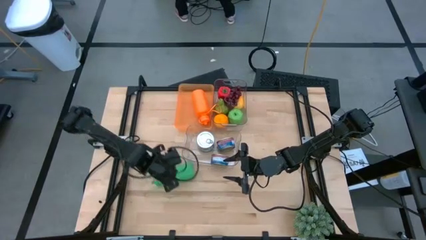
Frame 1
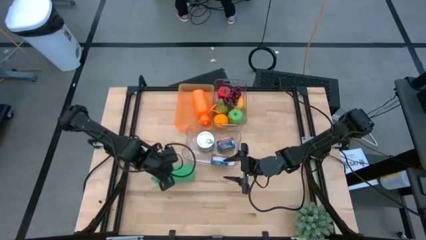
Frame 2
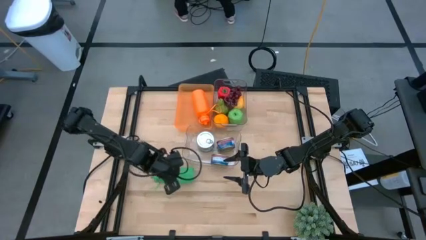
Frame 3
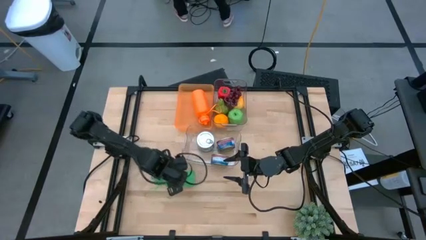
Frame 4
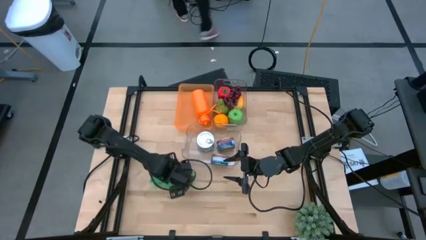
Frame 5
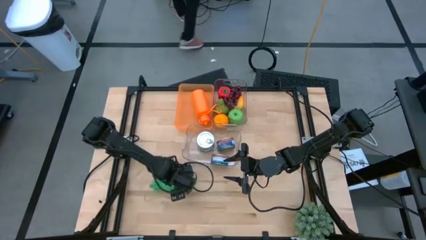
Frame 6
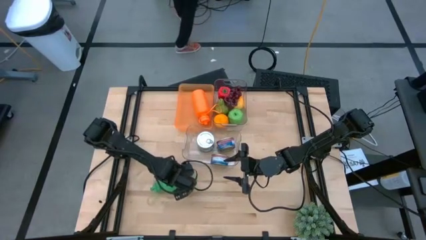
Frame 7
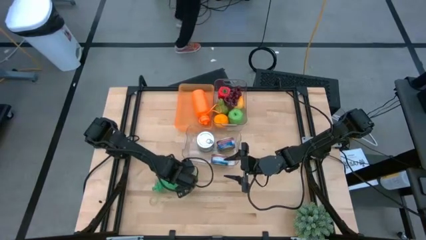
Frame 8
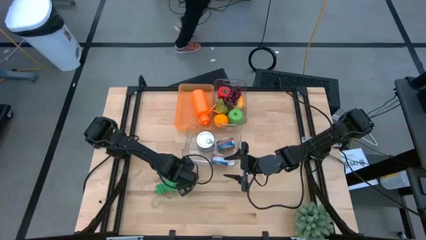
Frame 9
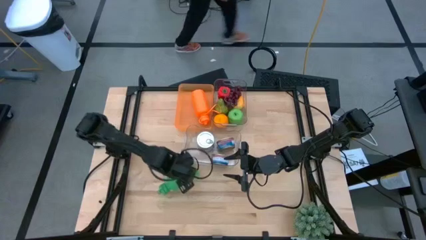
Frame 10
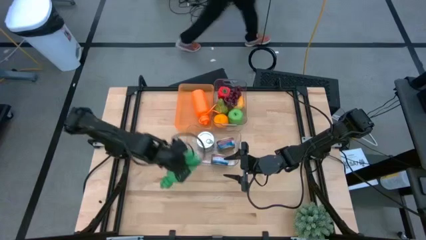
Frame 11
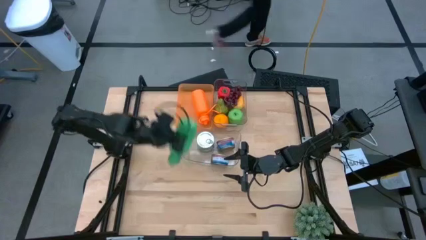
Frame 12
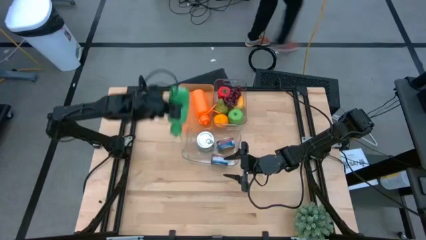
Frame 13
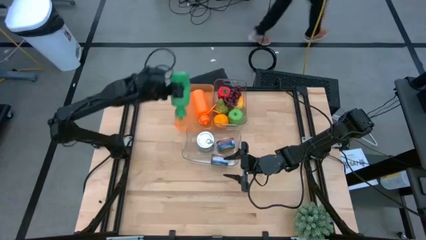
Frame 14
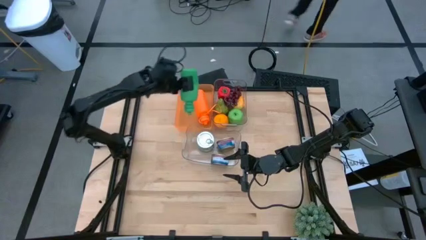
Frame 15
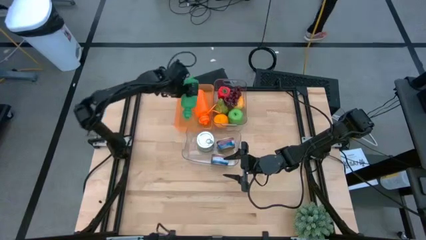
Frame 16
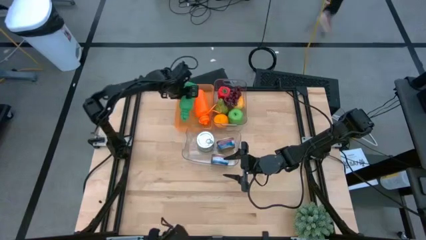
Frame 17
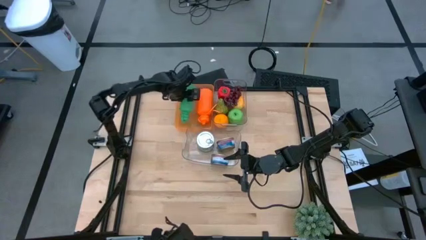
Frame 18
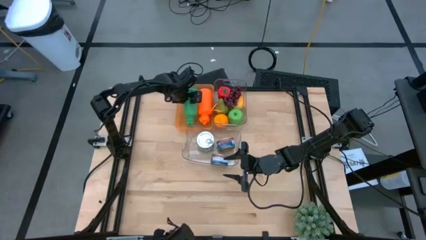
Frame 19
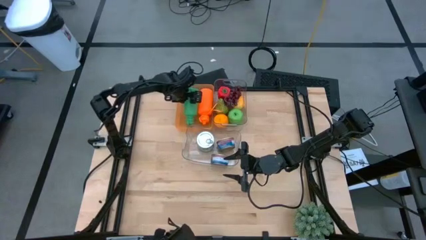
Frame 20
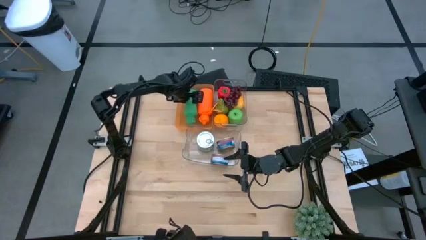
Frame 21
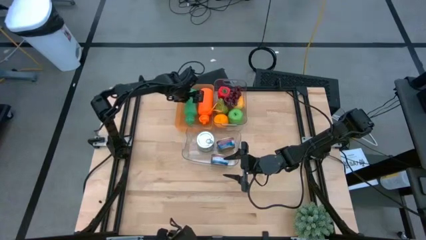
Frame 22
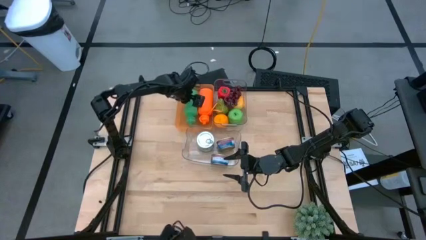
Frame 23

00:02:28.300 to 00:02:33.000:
Task: Pick & Place Food Item
Put the green water bottle into the orange bin

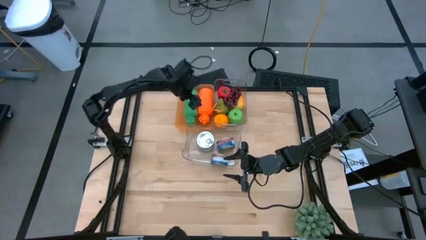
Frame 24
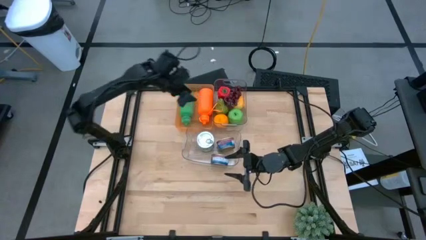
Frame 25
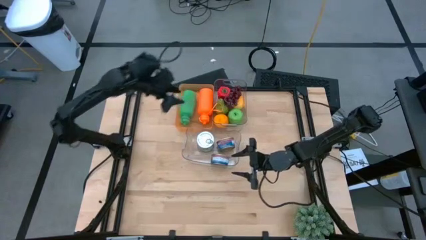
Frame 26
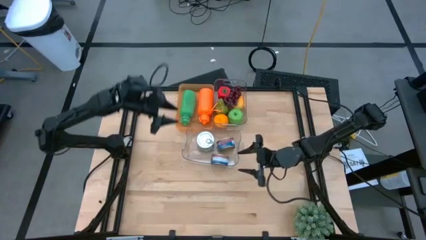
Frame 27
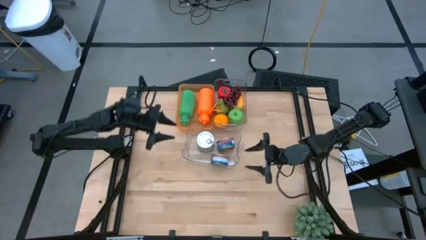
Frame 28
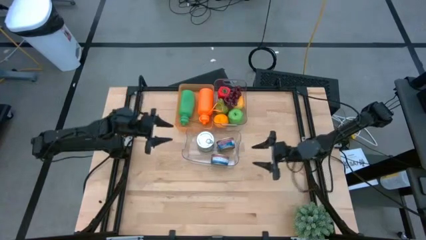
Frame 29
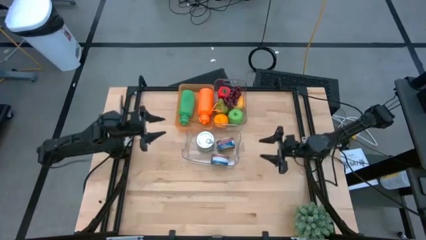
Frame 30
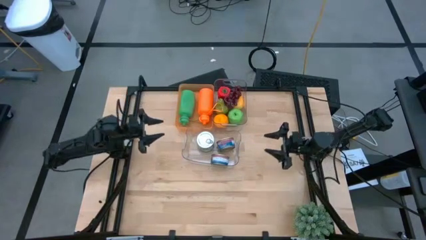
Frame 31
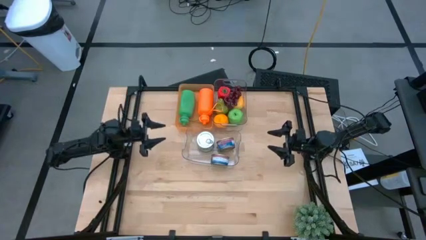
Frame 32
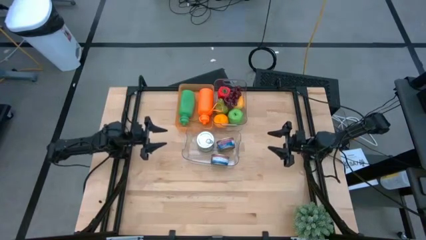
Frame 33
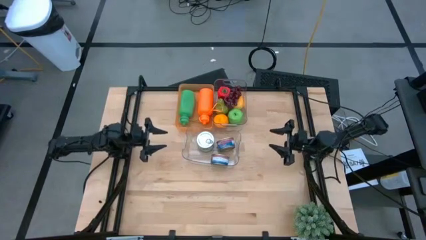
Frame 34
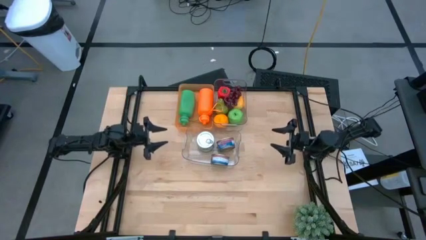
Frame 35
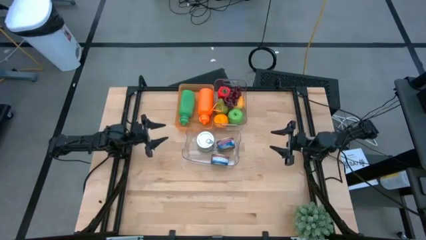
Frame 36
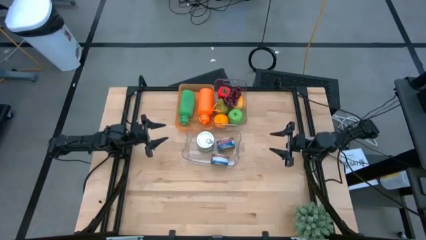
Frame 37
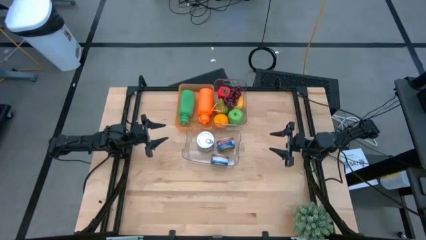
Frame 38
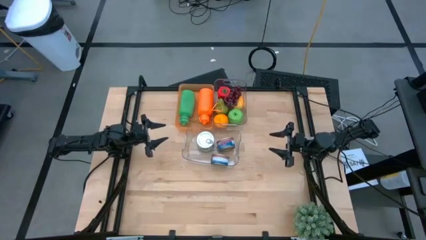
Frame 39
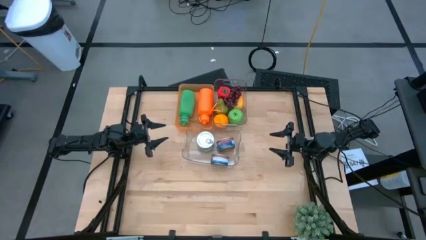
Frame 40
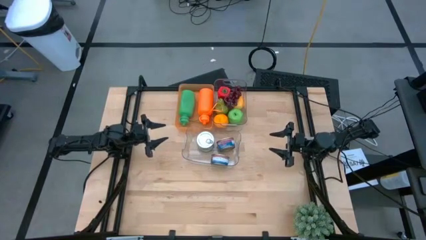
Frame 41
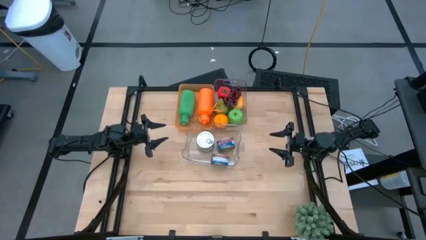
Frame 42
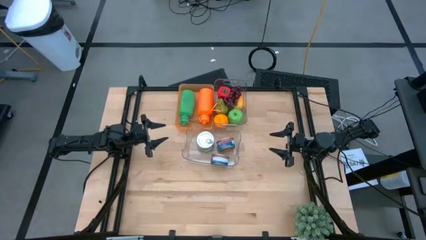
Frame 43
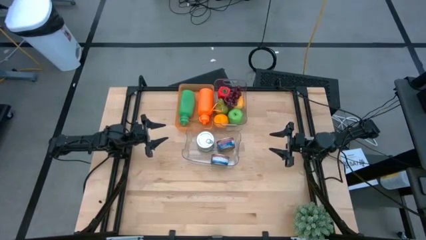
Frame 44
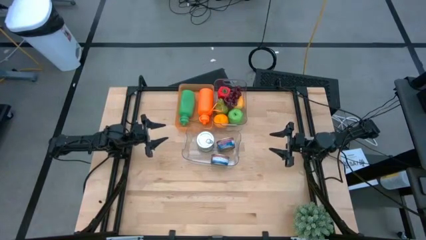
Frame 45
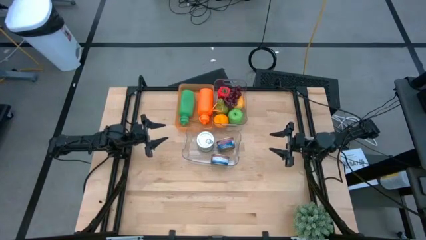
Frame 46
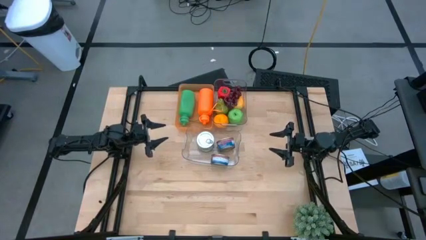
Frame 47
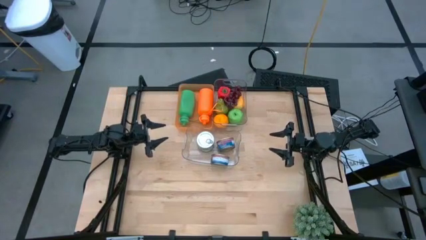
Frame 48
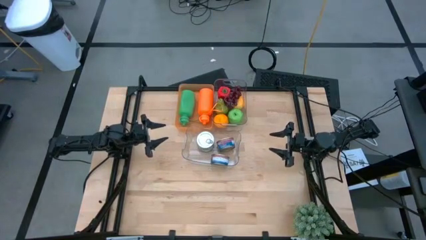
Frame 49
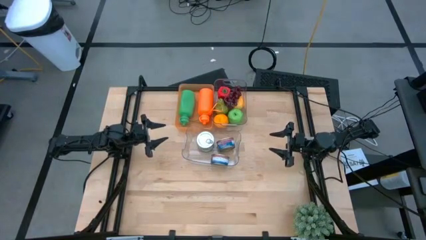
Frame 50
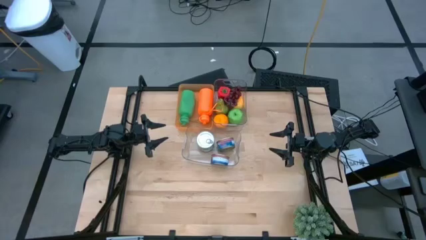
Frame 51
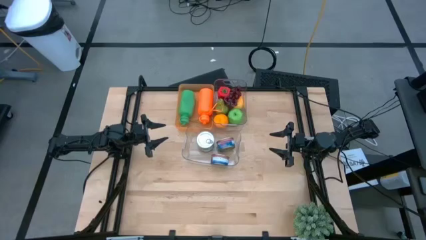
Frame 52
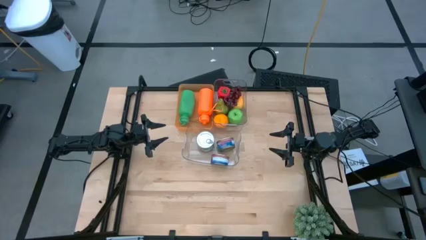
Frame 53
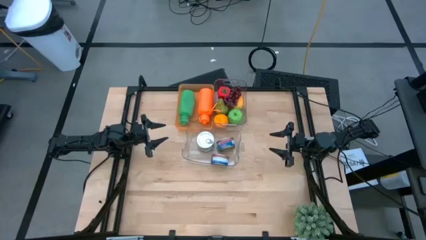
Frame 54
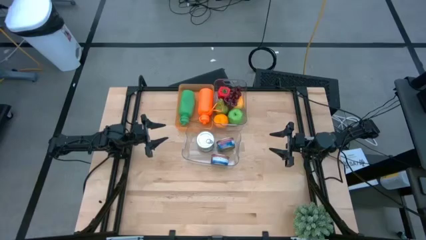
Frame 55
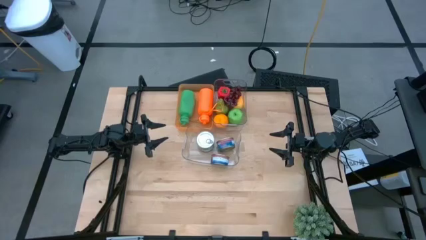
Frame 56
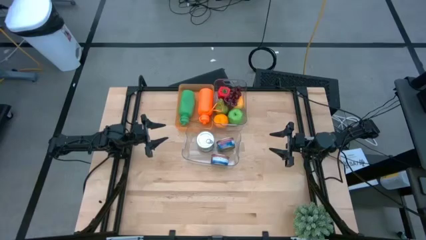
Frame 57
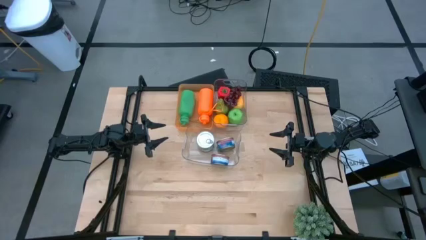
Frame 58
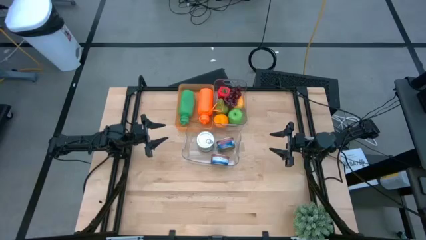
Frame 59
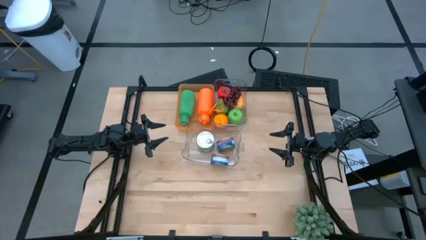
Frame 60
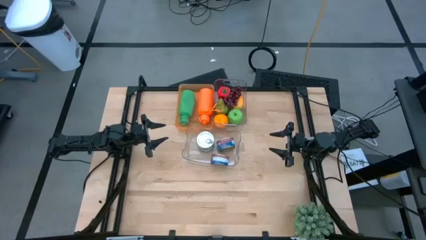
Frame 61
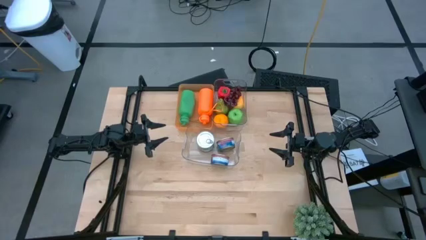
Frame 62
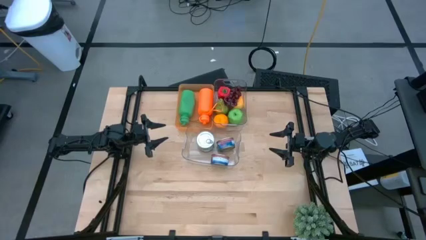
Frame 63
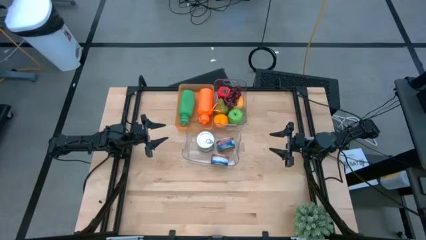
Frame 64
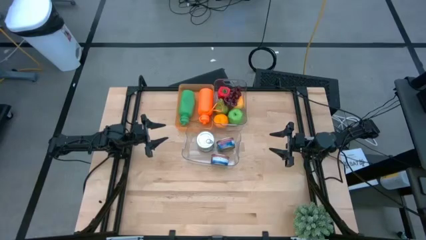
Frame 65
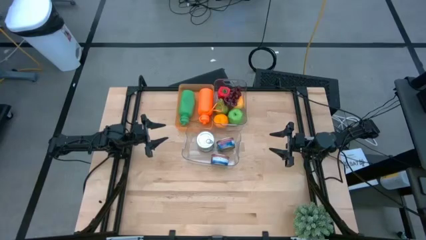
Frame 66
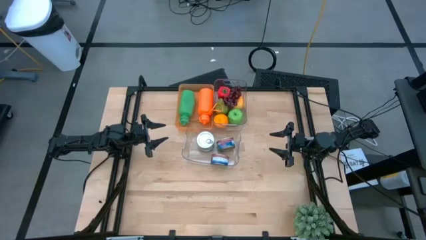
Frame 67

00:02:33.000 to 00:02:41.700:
Return to Home Position
